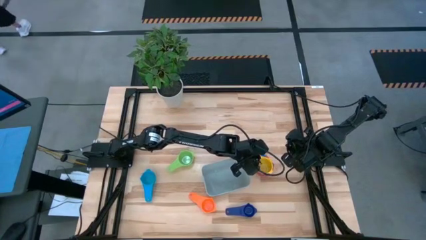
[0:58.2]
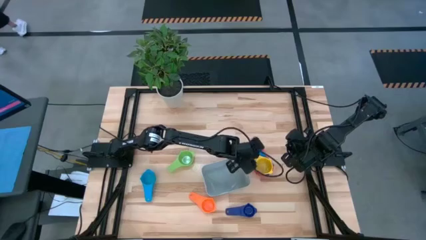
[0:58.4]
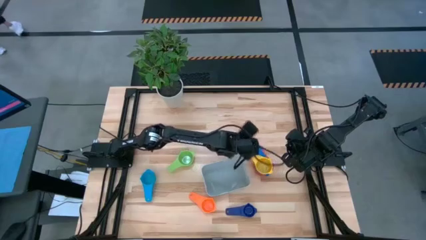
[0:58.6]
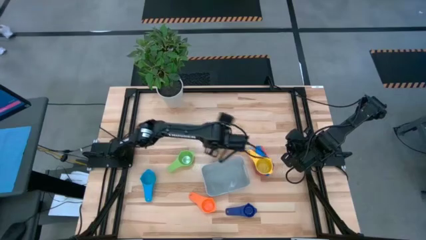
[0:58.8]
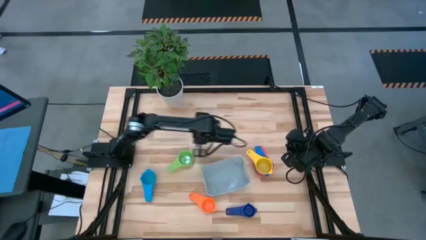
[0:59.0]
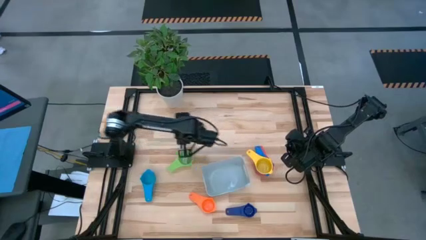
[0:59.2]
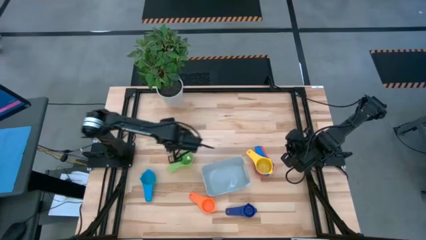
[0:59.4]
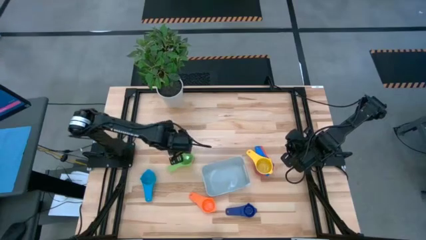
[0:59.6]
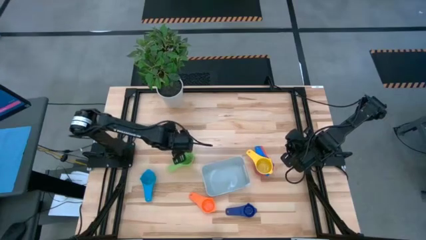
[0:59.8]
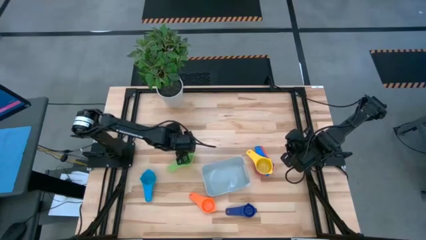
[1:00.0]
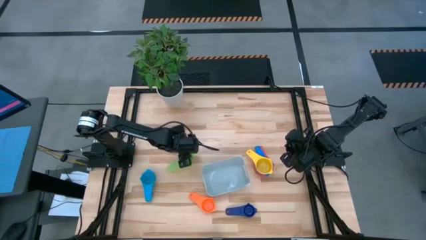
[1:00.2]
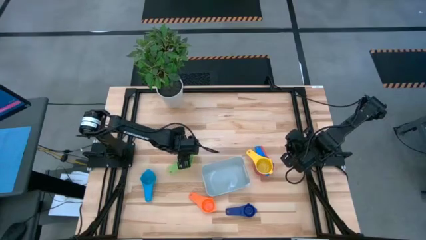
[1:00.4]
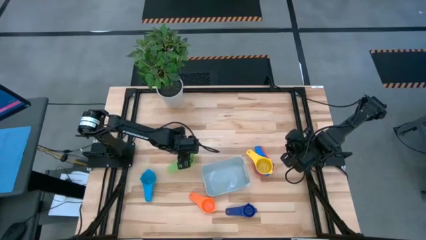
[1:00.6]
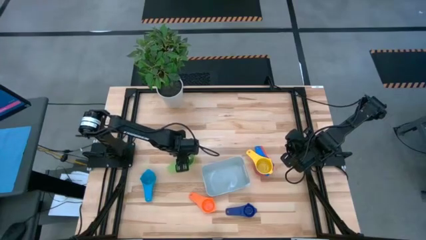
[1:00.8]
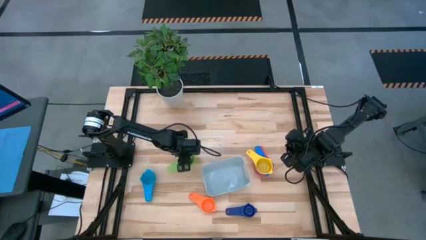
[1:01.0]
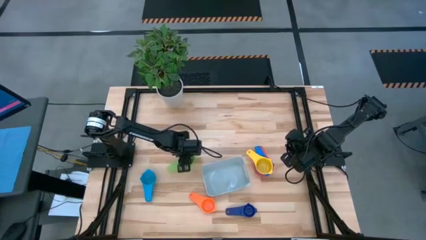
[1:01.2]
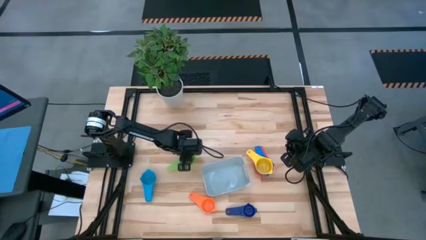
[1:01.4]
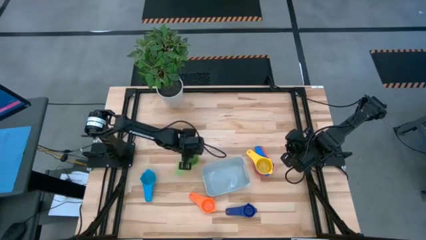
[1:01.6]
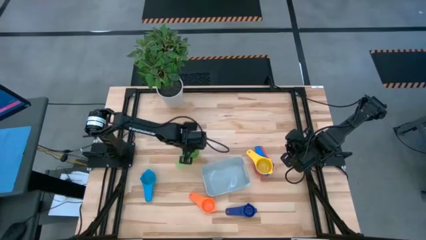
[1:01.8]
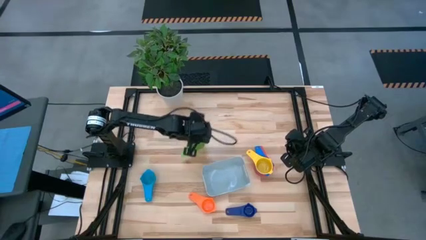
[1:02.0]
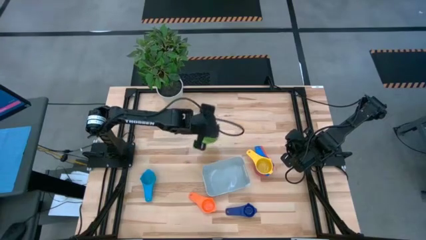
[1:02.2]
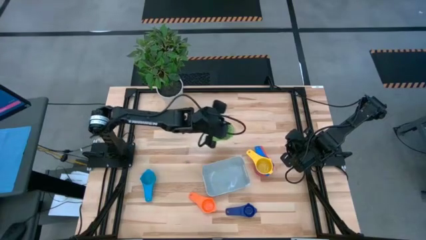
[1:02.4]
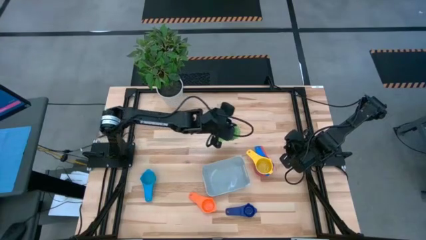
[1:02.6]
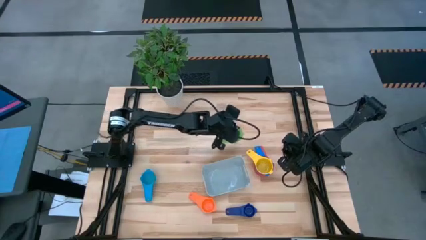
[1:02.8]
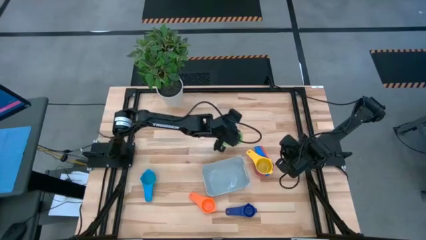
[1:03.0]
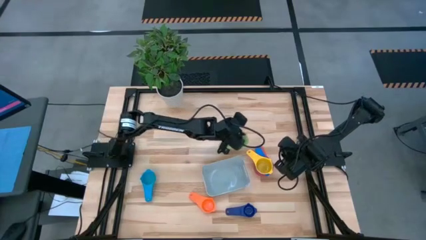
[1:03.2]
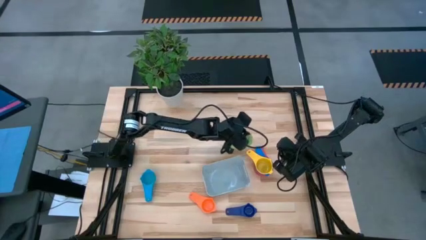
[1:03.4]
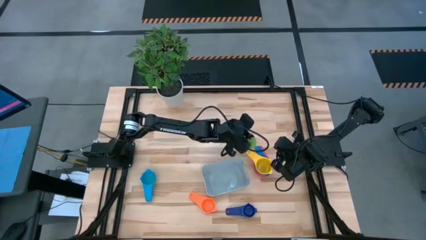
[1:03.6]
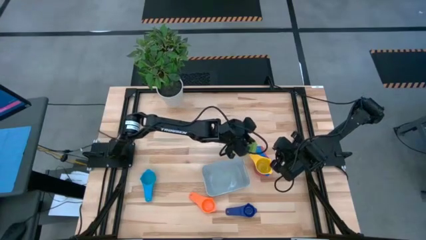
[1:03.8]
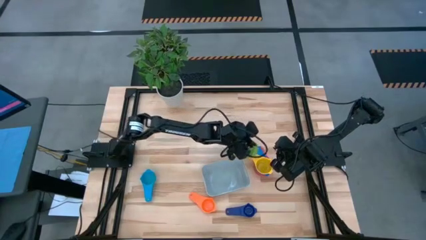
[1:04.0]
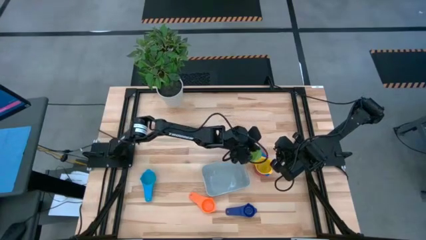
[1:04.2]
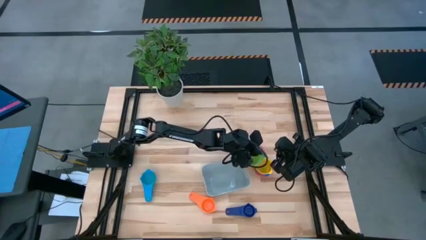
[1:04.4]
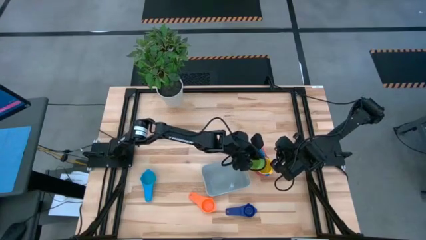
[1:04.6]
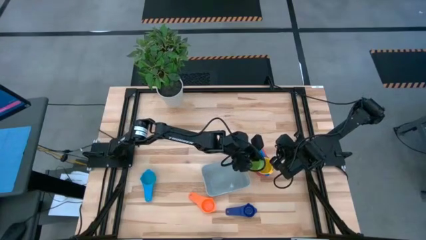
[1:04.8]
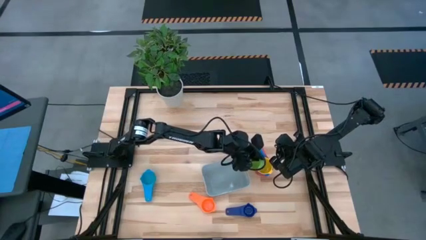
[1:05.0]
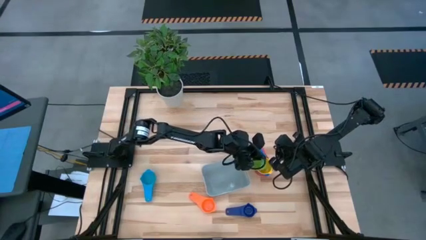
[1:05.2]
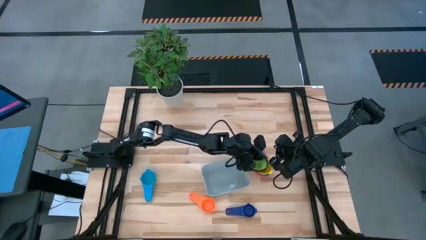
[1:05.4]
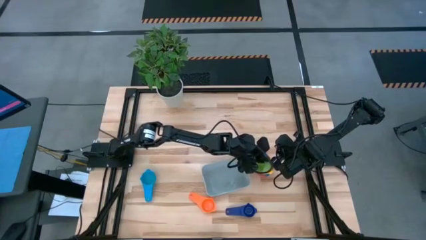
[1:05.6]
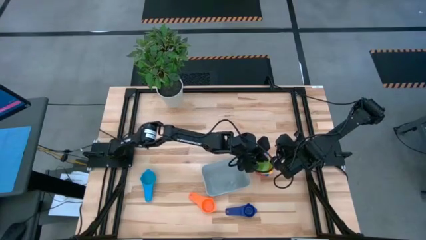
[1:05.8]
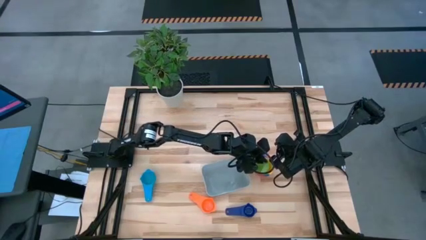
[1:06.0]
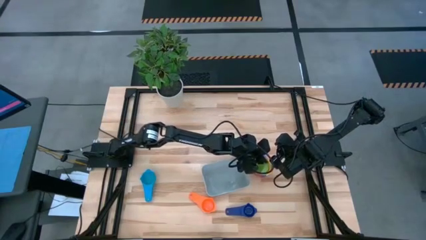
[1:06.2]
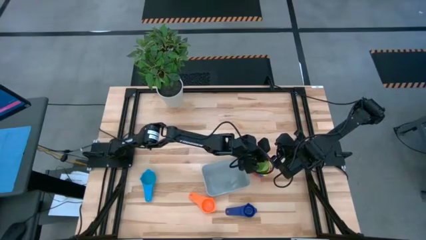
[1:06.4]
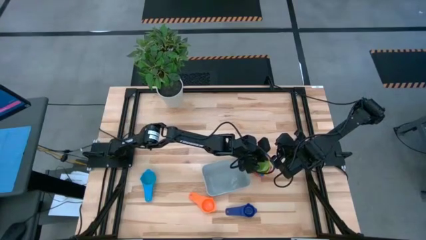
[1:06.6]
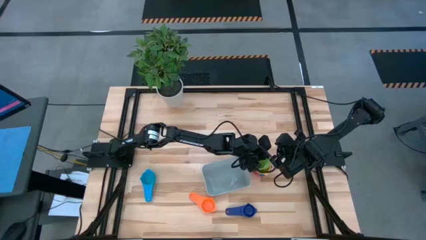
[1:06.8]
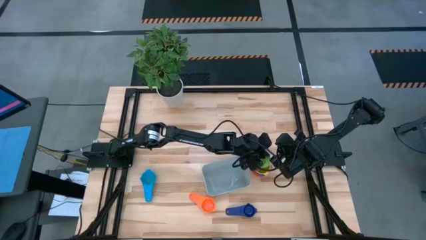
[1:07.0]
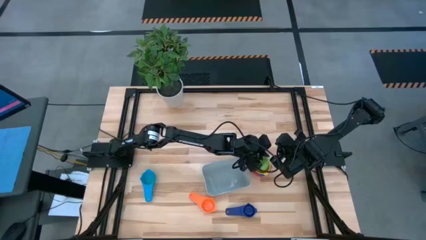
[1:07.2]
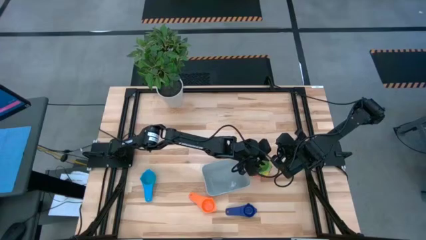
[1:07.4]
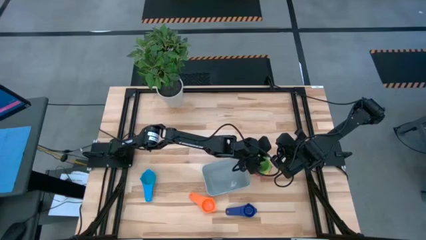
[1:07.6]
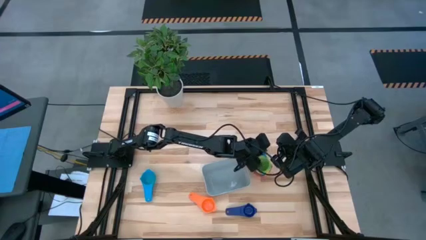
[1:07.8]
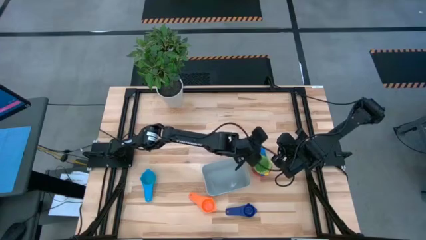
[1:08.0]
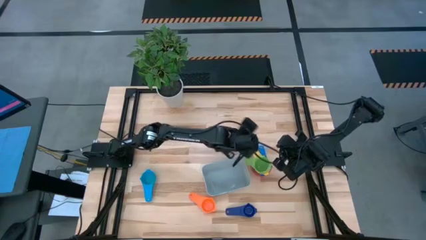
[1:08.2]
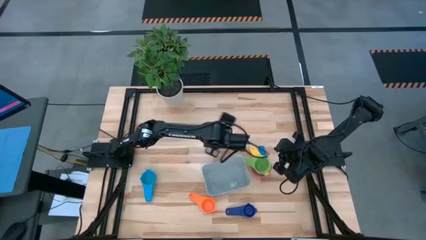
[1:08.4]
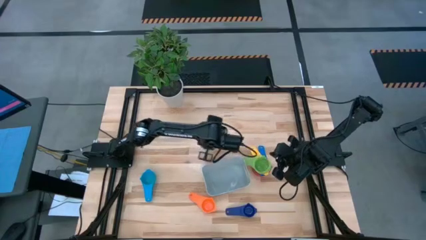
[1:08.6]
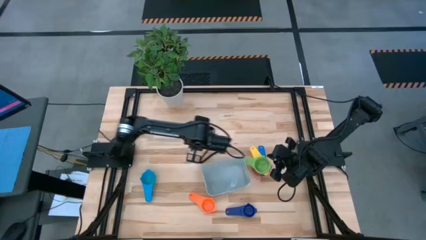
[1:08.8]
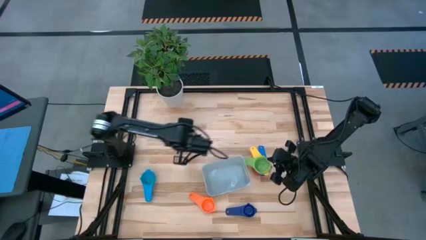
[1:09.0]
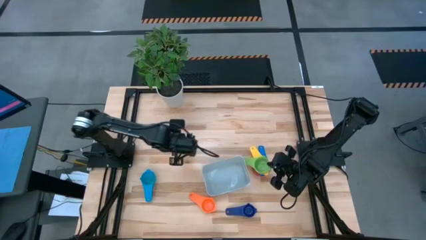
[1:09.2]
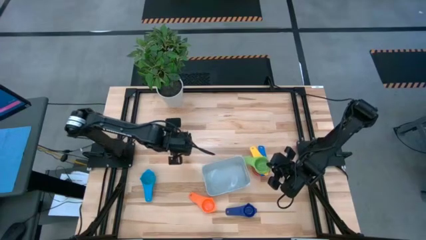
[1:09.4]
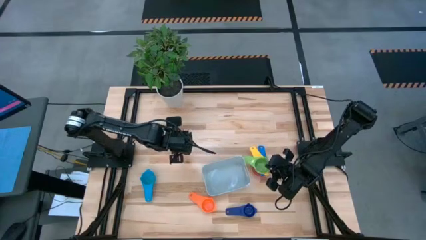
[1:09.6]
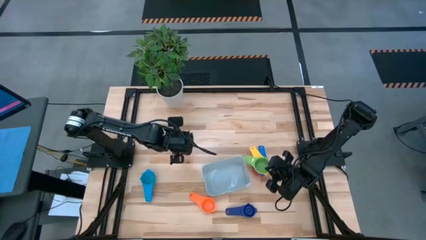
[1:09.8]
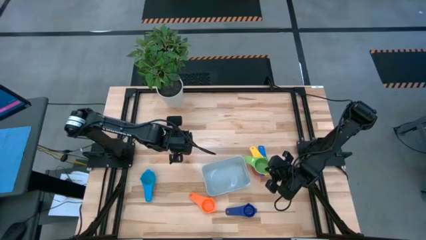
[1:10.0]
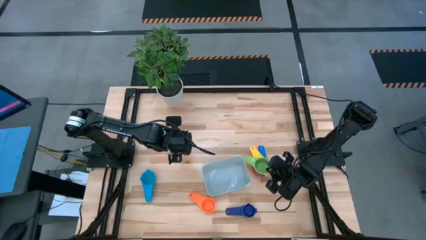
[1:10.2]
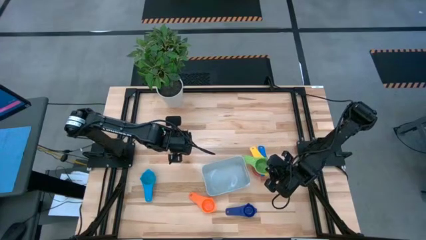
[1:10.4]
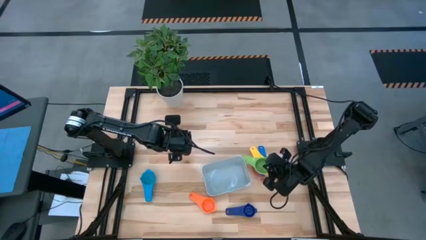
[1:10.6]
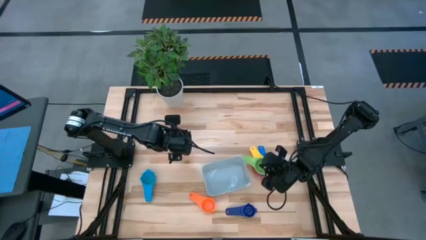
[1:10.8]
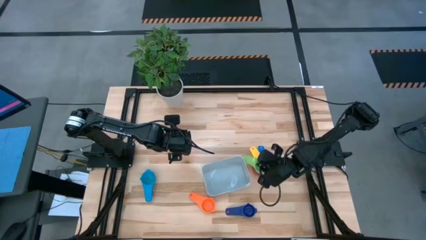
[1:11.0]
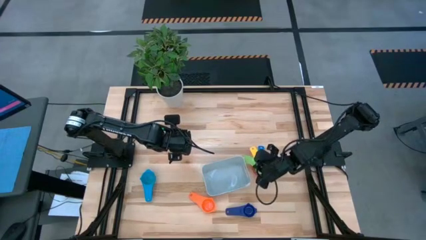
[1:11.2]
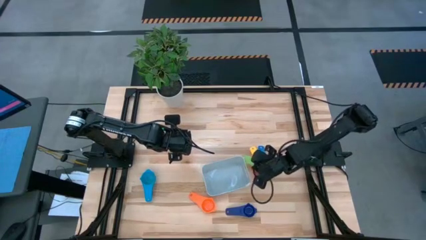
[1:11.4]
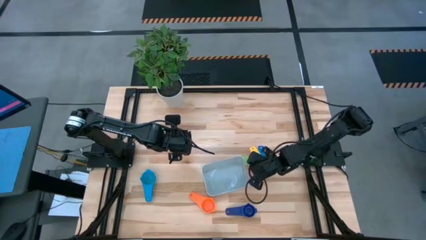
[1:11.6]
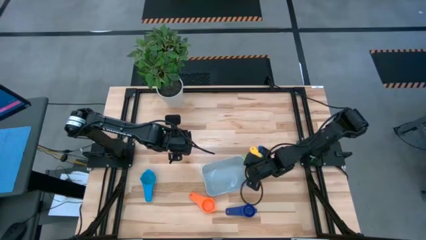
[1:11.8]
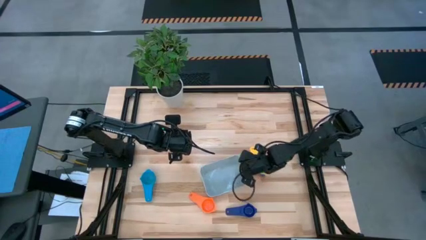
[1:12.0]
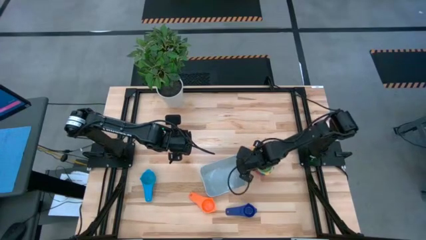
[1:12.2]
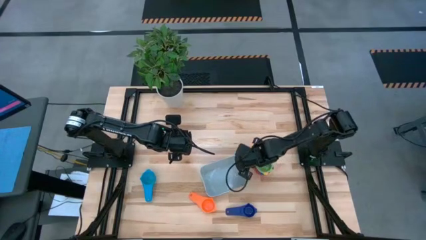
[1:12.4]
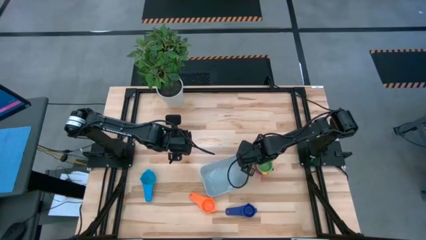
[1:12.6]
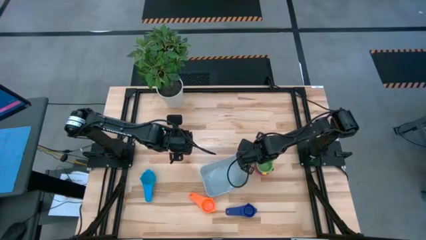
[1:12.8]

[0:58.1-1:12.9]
Task: Nest measuring cups in basket
Stack the green measuring cup on top of the yellow measuring cup

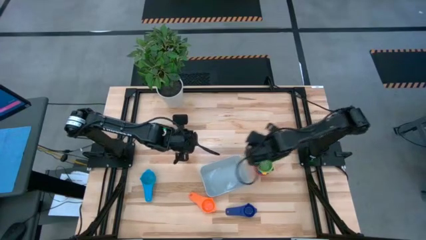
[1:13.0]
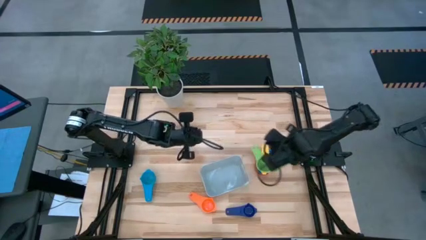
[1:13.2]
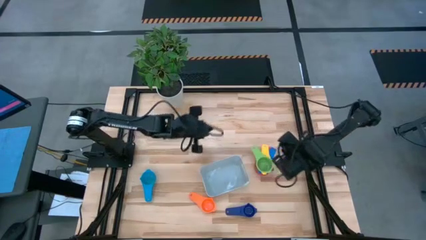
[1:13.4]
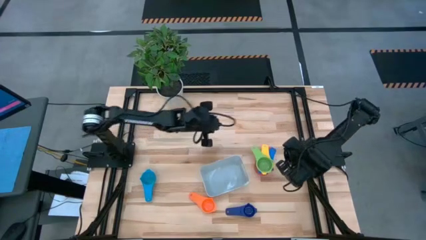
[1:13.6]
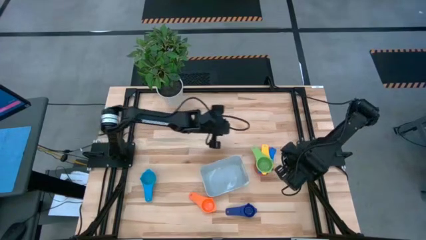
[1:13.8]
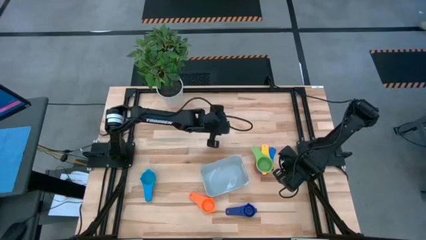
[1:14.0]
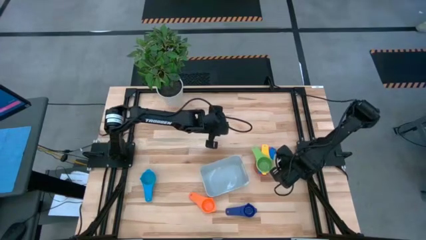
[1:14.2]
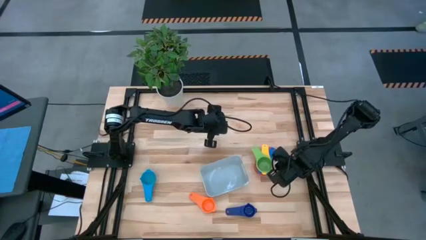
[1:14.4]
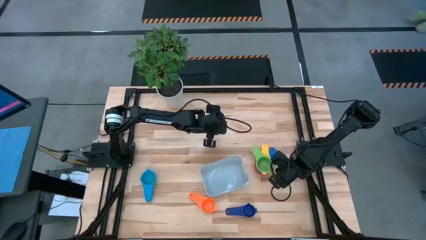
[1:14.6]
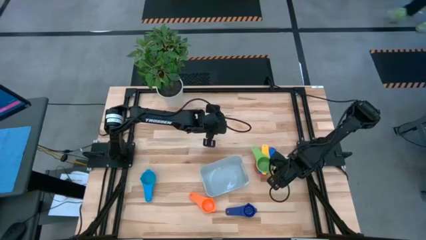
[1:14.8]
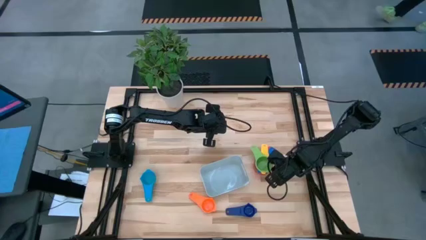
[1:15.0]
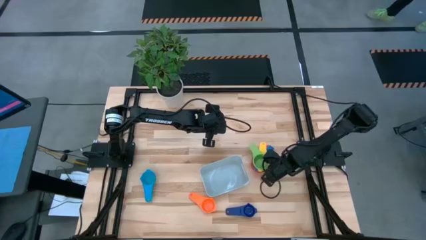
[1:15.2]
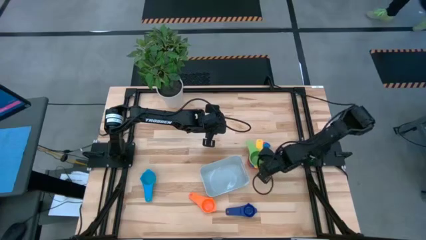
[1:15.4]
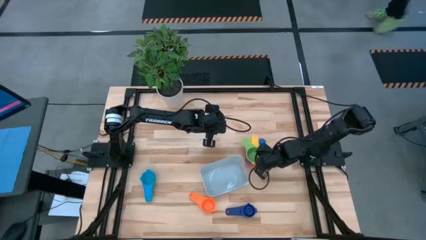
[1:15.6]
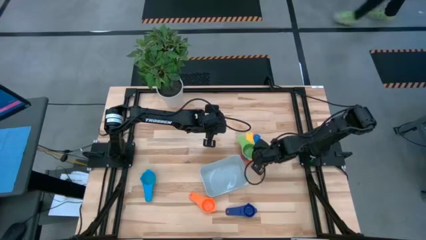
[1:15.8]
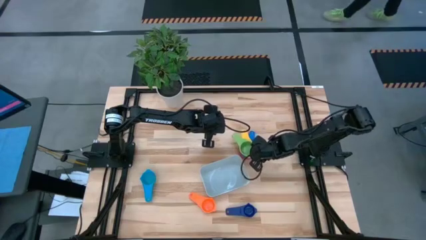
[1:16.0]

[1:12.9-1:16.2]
Adjust the stacked measuring cups
